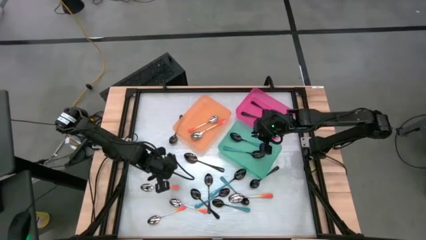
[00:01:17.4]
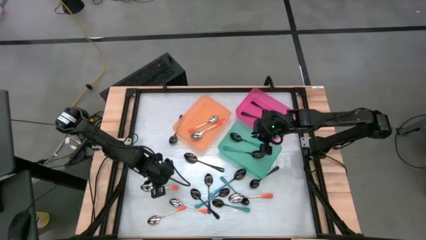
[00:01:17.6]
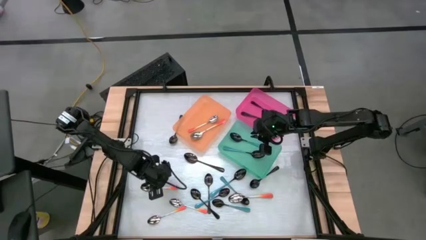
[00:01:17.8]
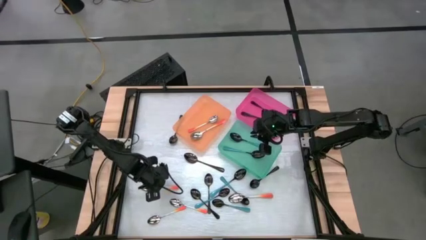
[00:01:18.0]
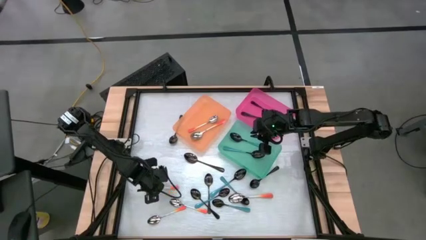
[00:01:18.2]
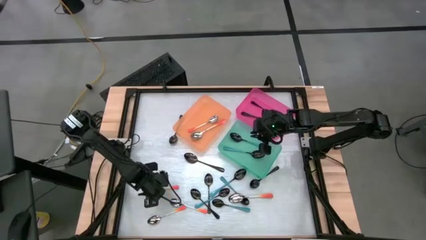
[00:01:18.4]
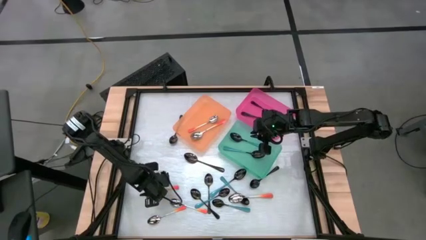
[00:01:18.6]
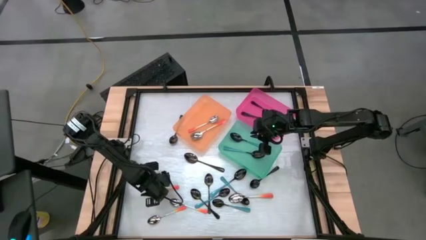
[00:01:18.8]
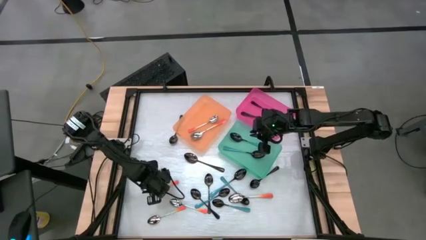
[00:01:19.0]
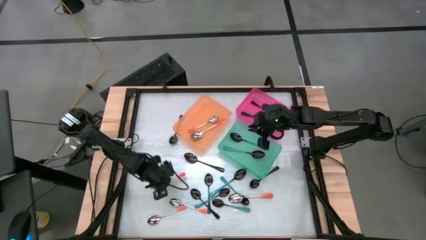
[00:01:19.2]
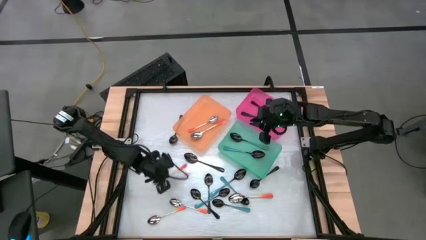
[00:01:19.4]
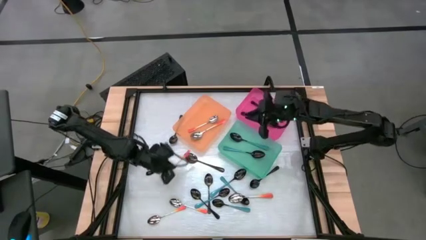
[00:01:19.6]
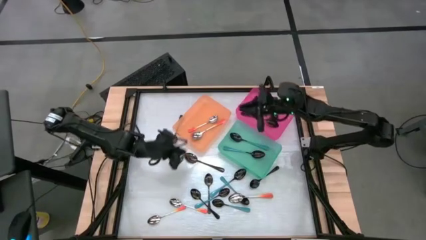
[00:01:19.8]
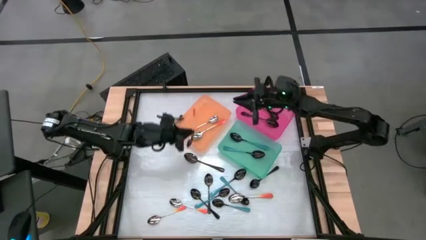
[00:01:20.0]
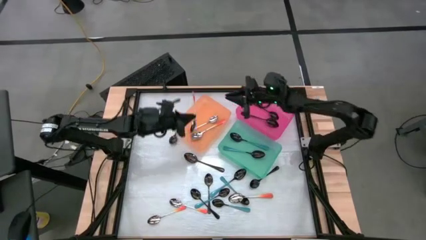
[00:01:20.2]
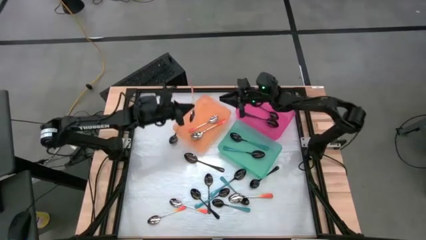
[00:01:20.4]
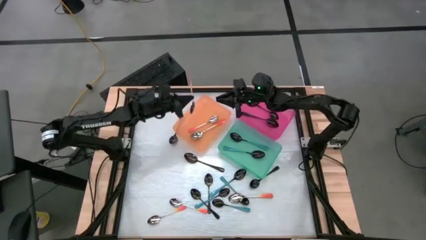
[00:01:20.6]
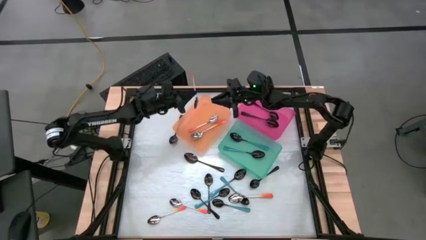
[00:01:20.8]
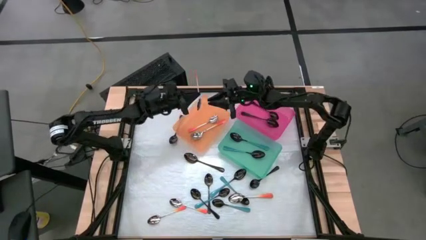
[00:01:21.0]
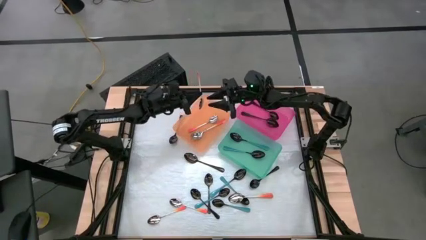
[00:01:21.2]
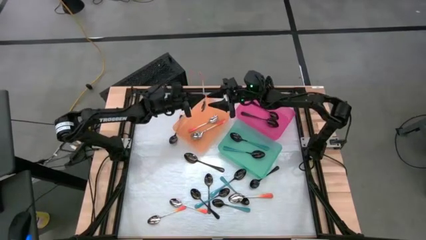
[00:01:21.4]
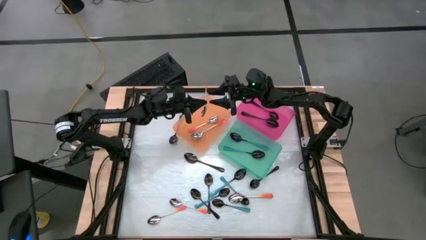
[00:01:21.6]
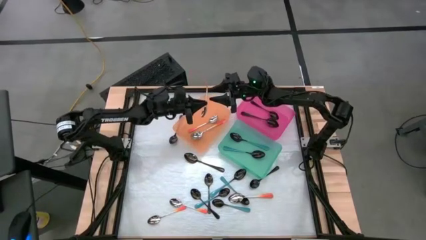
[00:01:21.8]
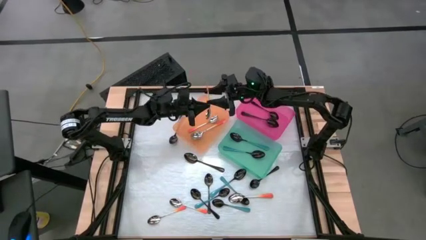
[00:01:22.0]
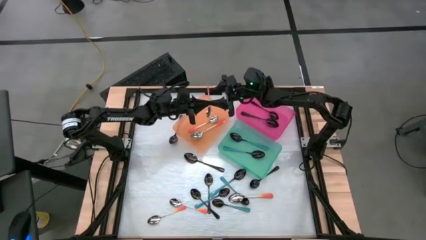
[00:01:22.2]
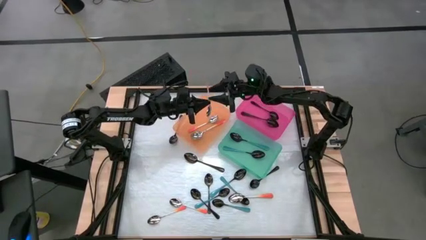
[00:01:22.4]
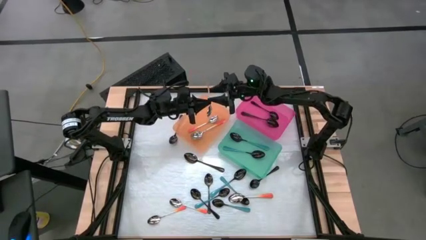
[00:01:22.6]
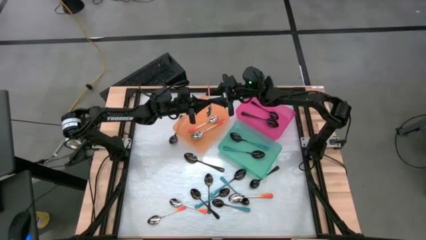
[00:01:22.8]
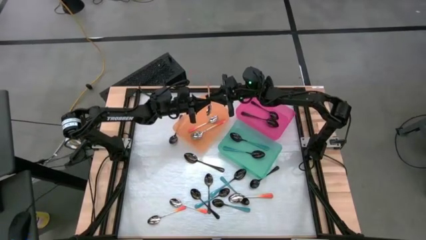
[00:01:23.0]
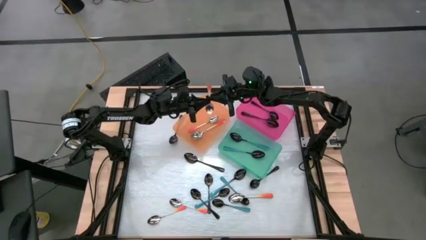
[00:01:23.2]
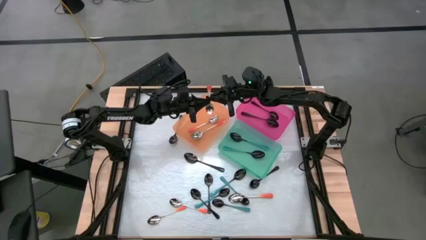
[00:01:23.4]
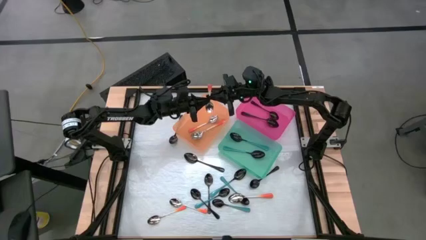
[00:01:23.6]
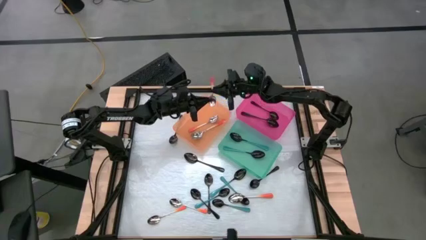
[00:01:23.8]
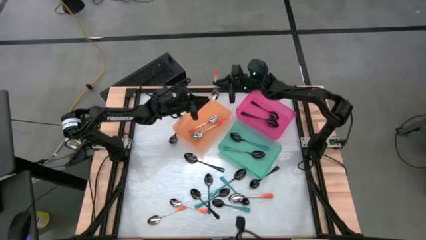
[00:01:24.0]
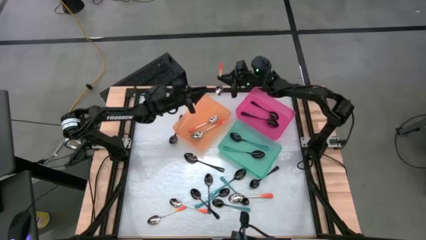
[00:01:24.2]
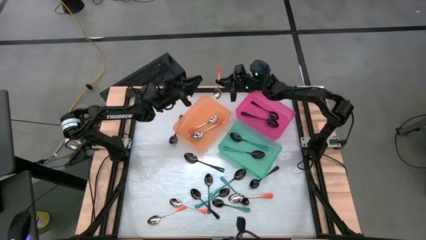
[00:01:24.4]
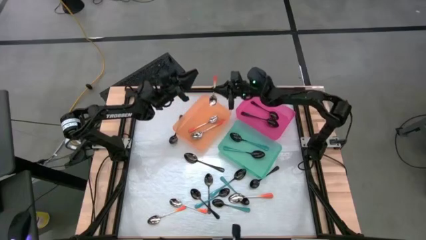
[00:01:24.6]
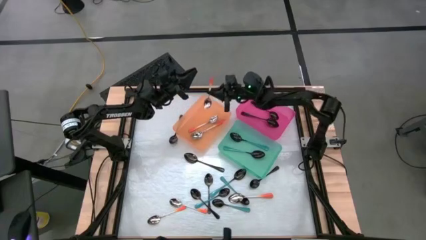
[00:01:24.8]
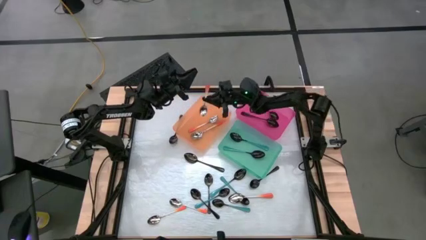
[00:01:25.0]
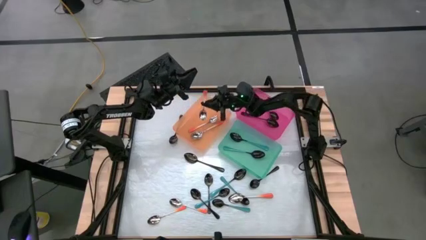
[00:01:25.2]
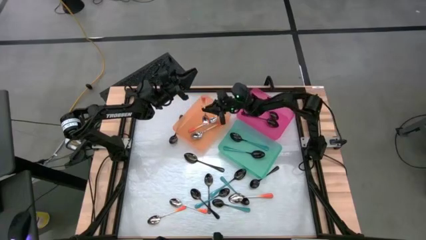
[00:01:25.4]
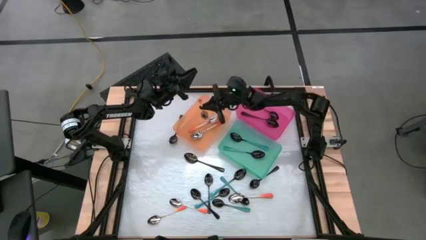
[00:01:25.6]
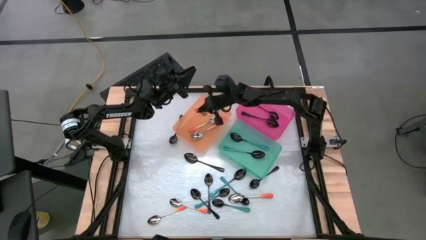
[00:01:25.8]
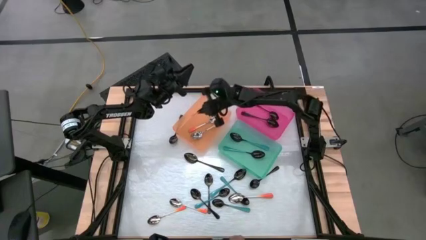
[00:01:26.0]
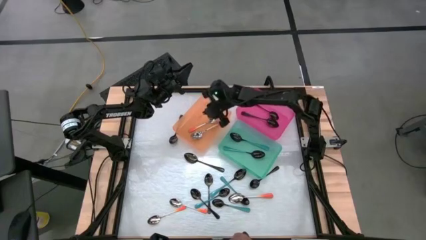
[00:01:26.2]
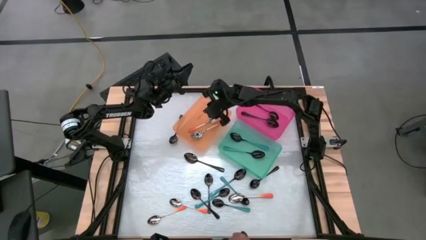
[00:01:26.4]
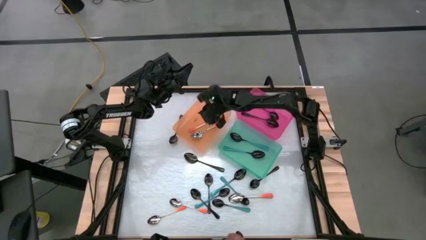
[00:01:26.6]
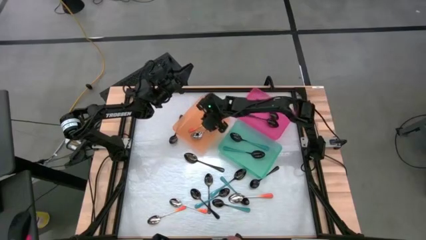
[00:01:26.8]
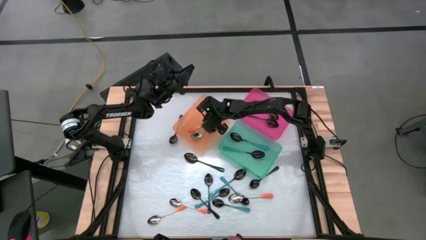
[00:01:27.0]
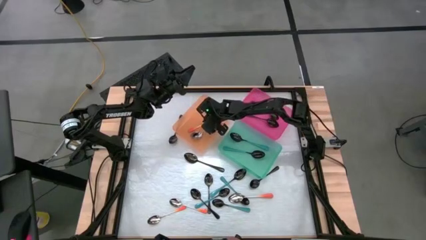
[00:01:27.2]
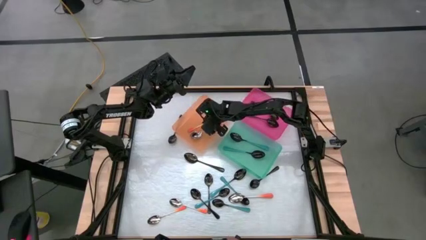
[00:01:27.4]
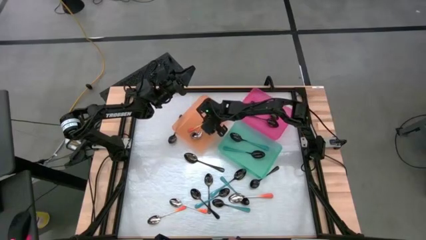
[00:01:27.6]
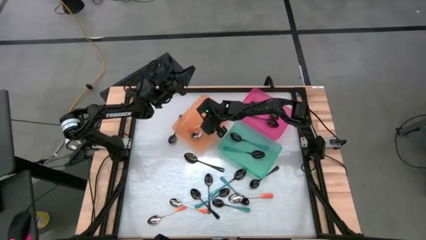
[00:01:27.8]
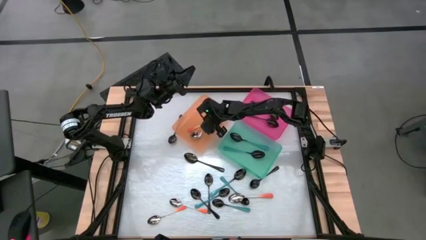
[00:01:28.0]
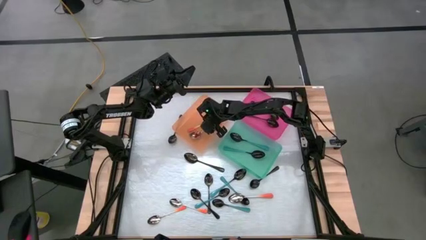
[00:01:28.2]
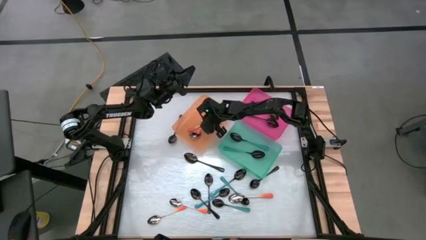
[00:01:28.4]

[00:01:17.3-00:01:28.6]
Task: Sort silverware by color (type)
Put the orange spoon into the orange bin
